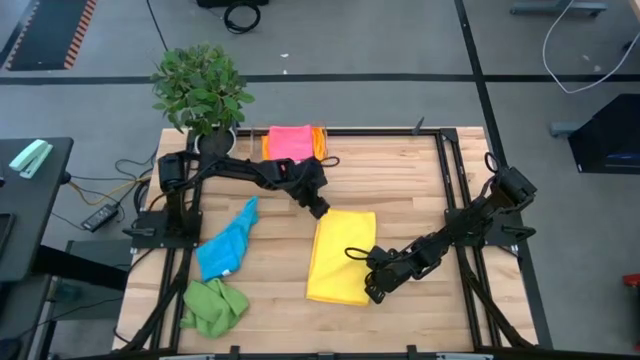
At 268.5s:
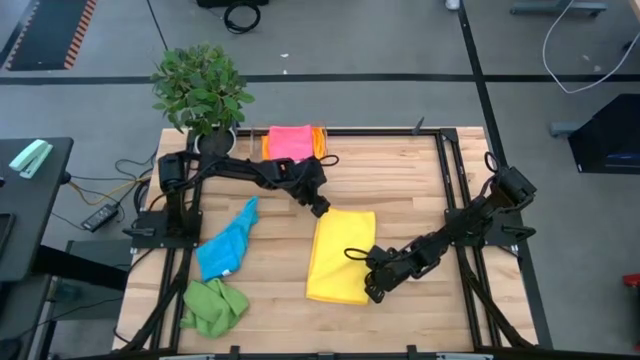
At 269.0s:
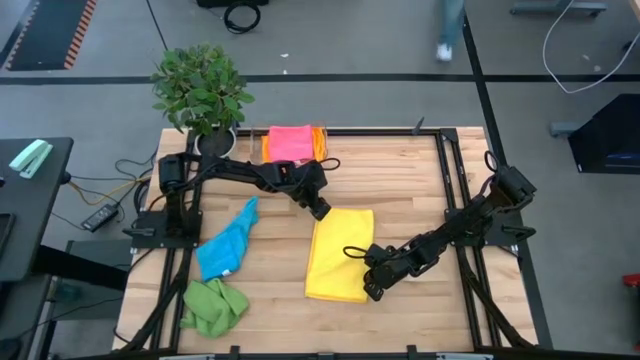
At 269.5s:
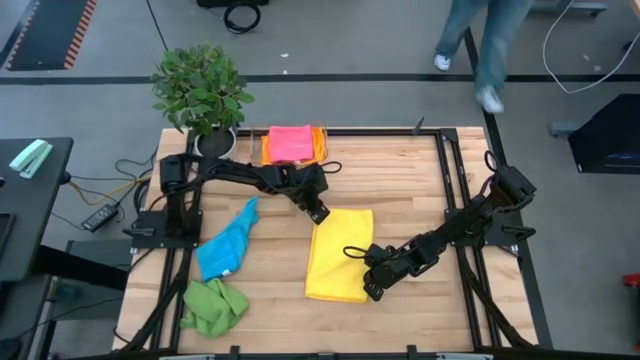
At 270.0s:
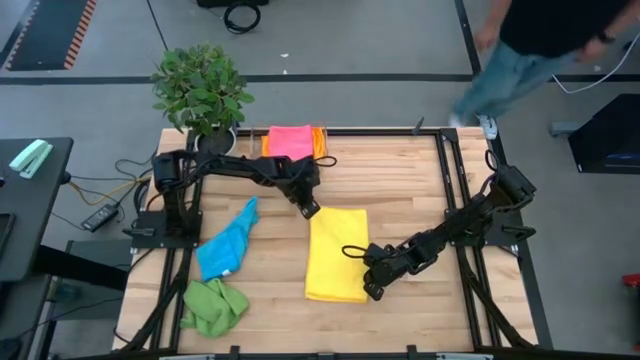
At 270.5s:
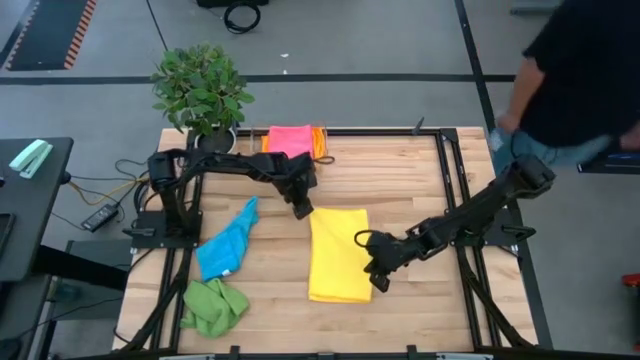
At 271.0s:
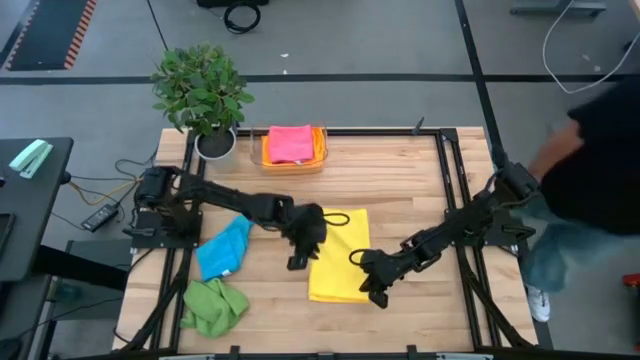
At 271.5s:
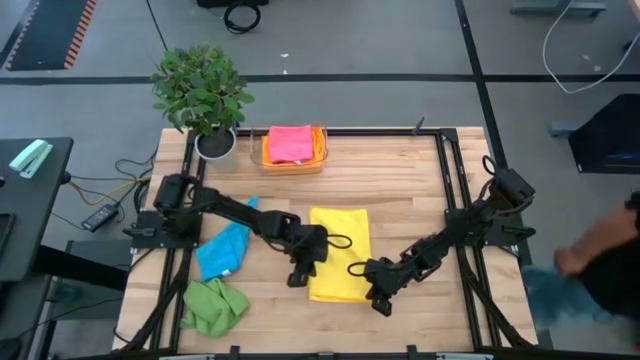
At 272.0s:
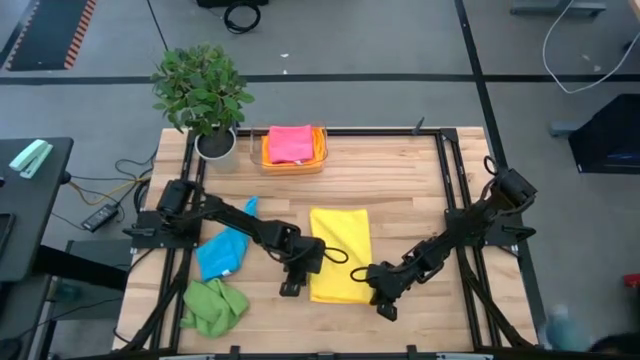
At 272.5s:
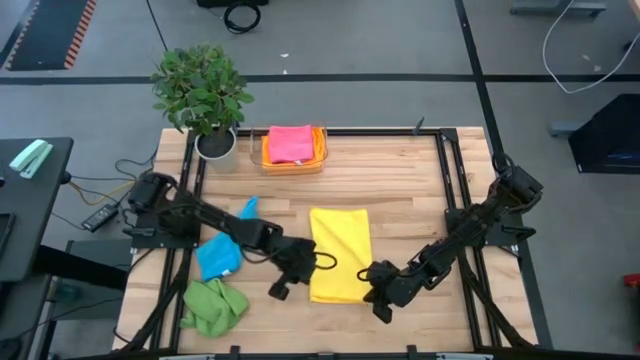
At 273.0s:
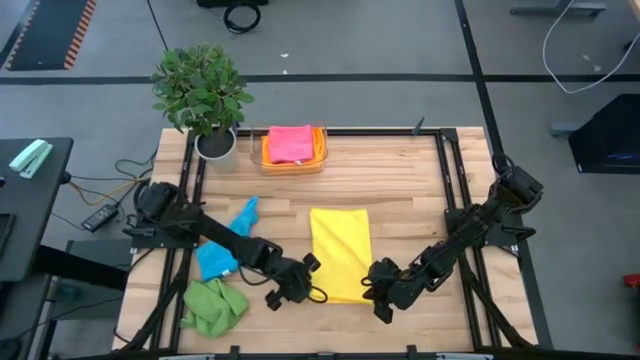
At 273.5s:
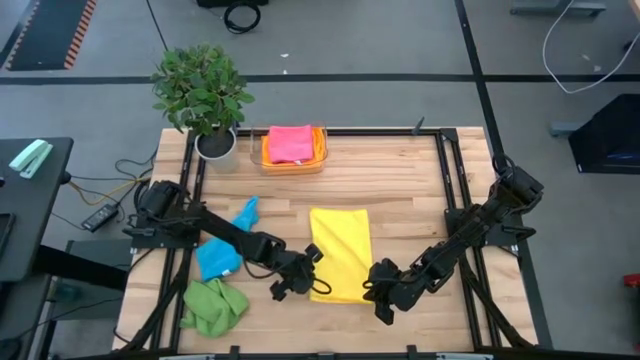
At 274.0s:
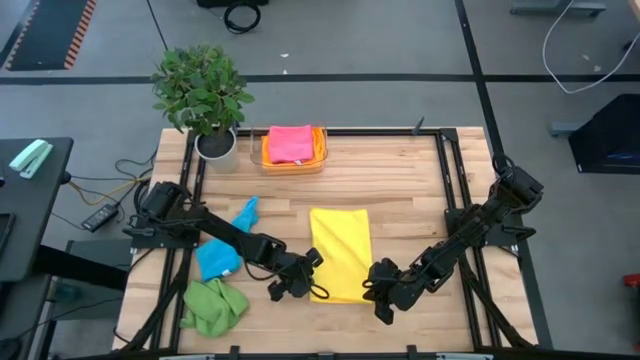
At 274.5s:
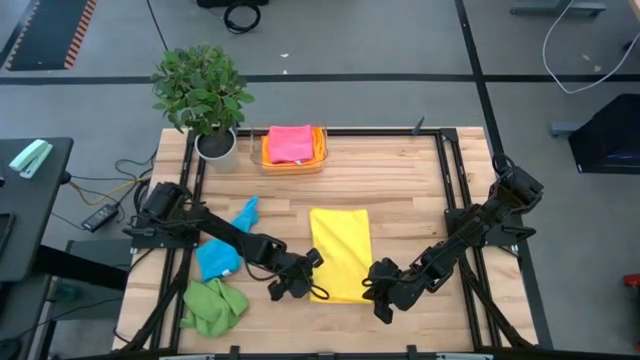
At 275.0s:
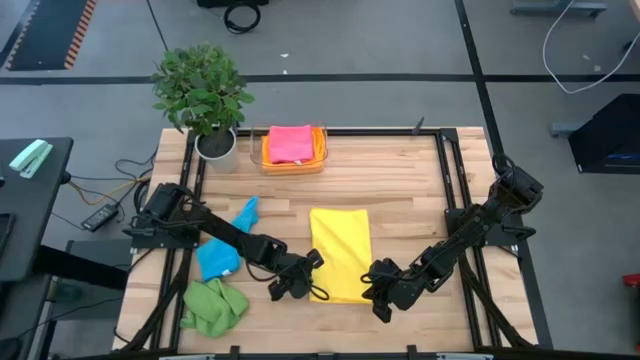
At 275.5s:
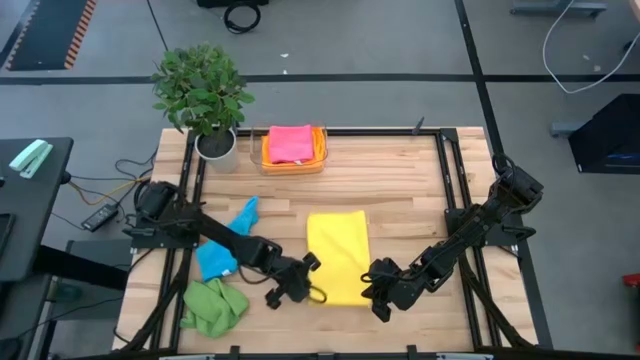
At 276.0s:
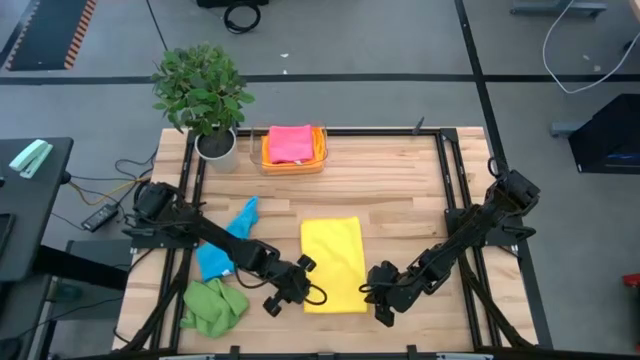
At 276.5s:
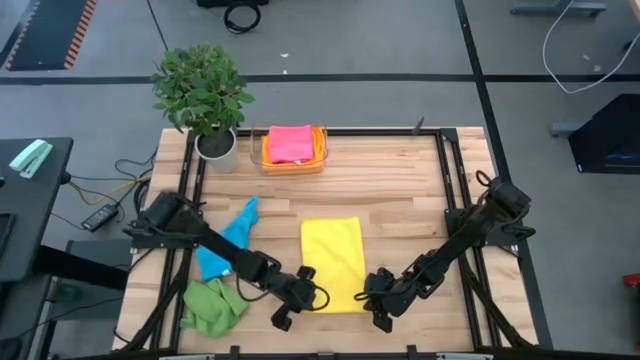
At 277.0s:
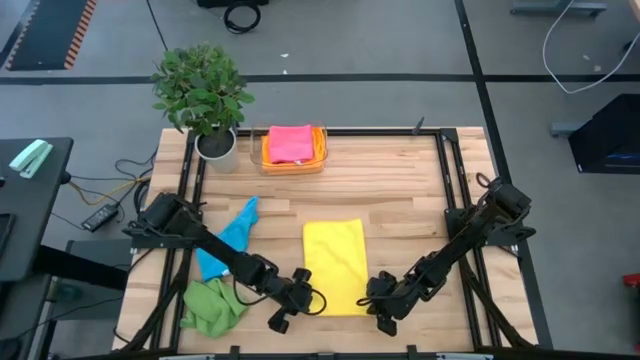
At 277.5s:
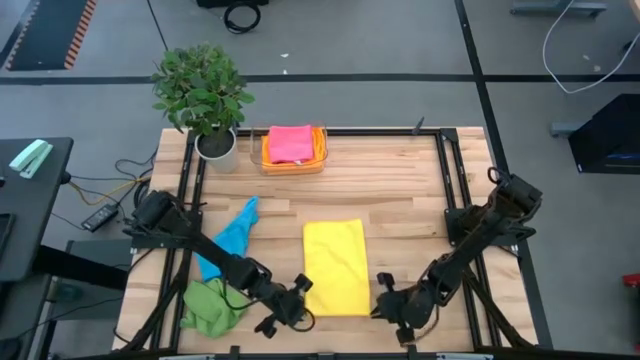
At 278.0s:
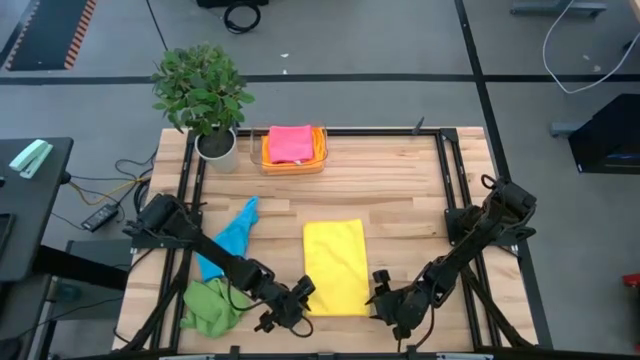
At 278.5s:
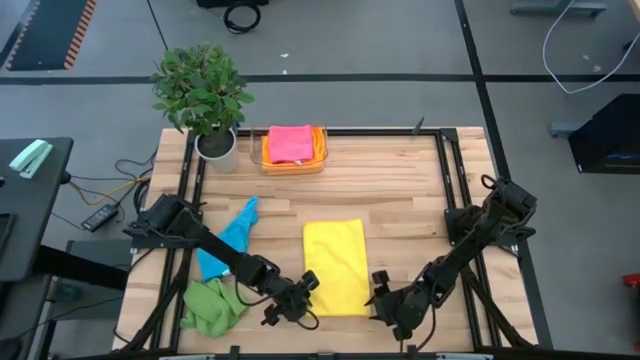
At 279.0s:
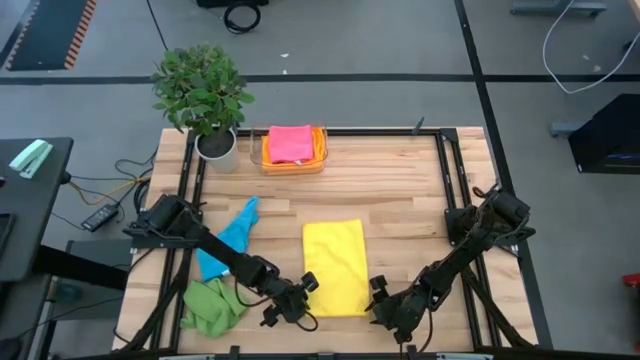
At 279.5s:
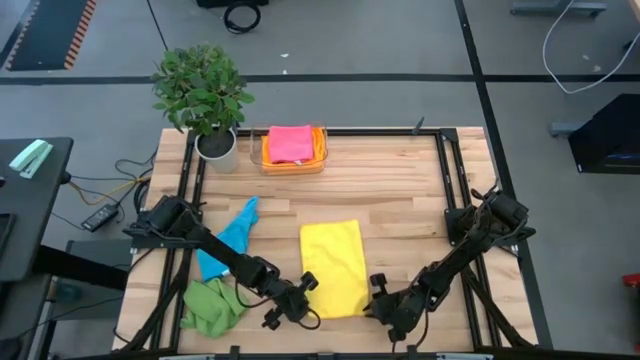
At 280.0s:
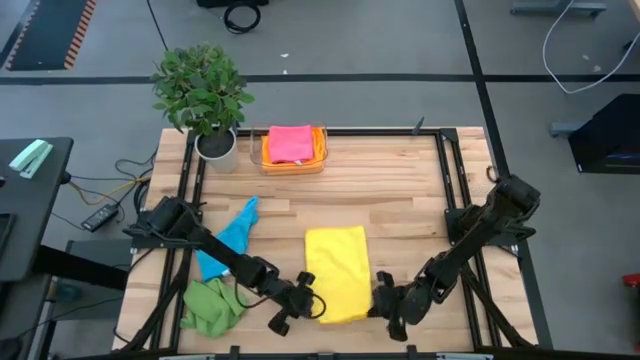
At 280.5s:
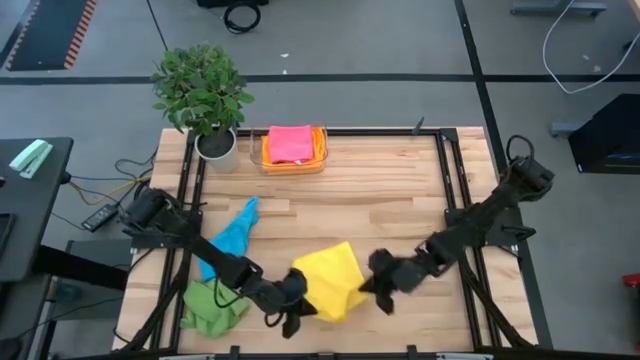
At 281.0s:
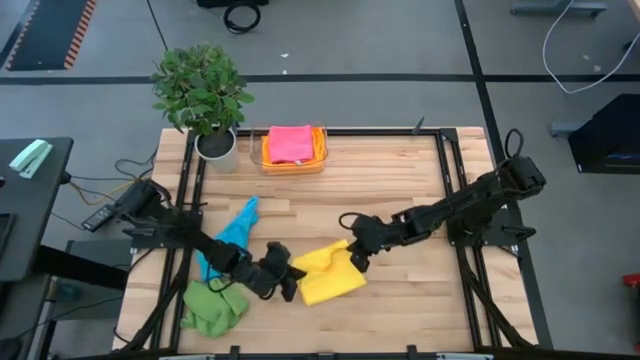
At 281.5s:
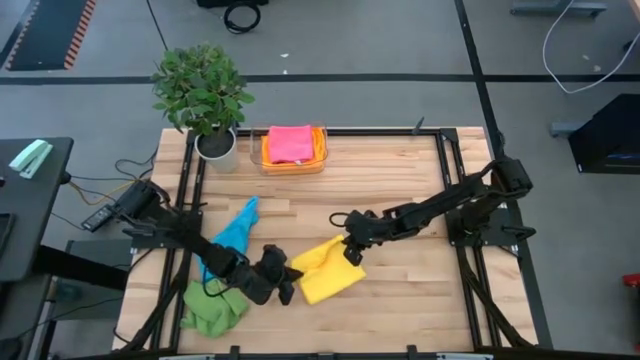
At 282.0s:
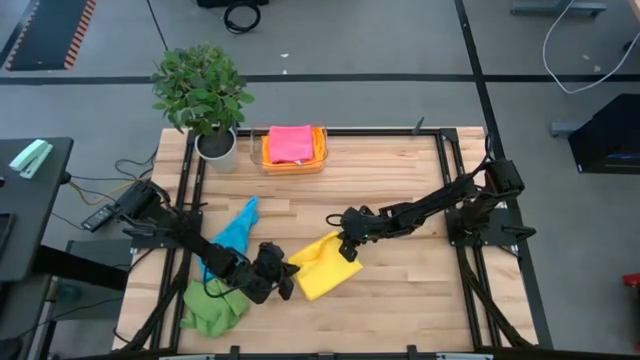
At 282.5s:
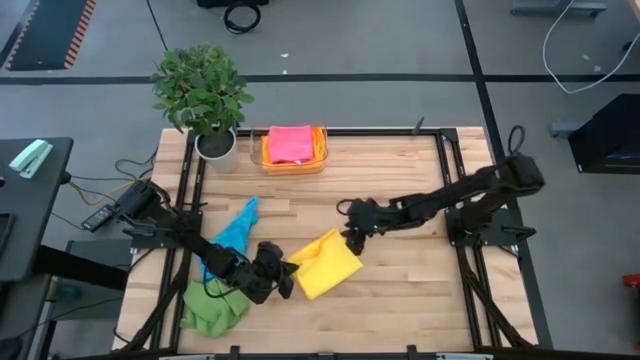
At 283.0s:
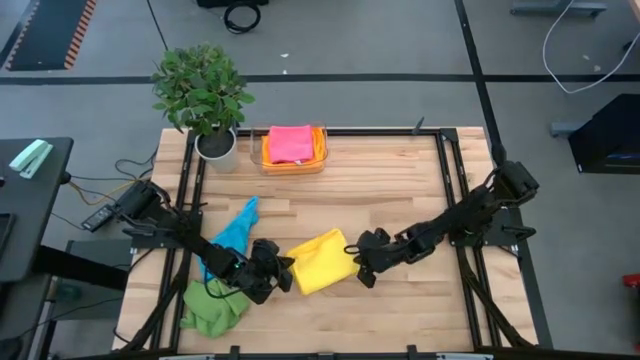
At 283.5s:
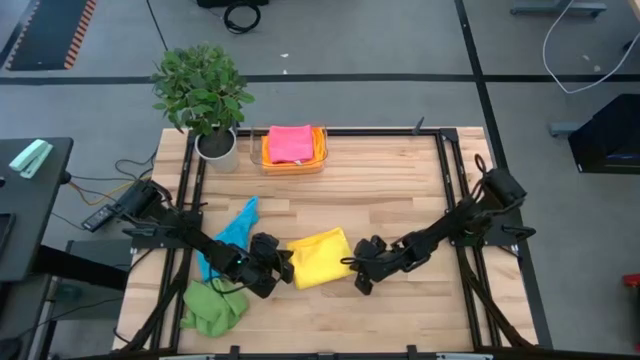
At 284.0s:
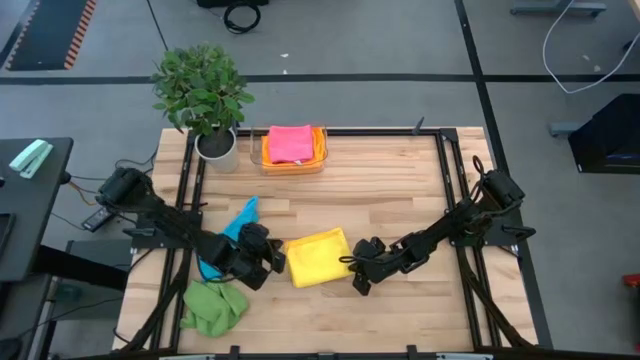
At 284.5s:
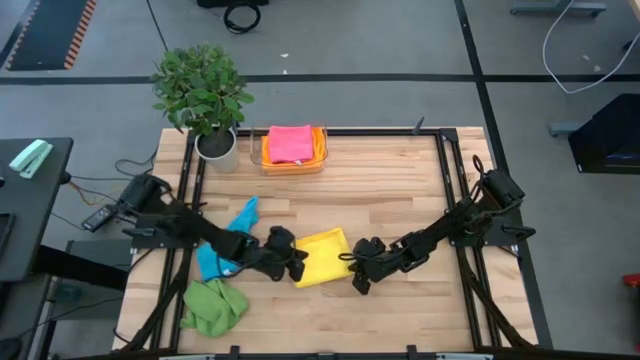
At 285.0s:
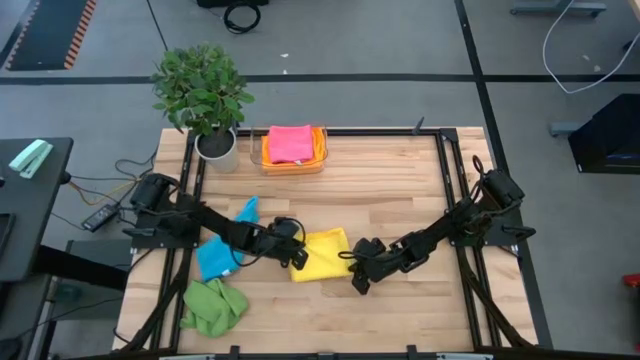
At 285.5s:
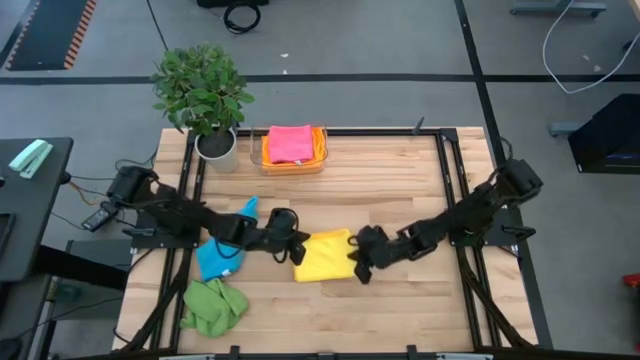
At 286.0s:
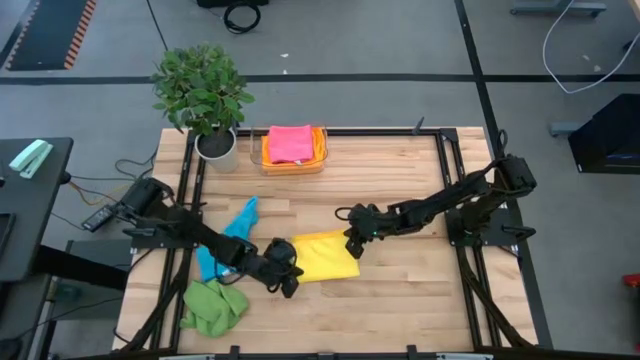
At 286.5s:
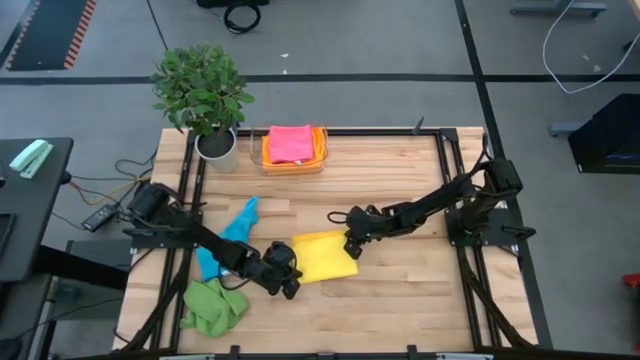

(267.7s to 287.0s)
Task: Fold microfiber towels
Fold the yellow microfiber cloth

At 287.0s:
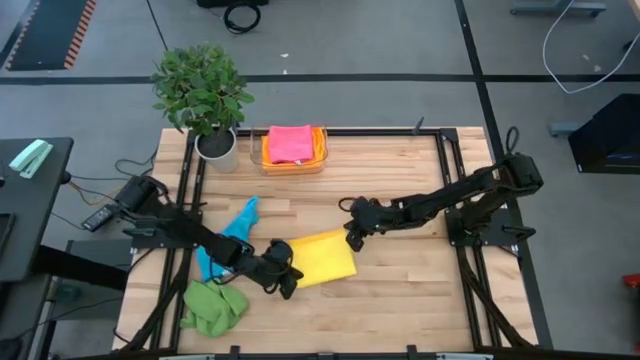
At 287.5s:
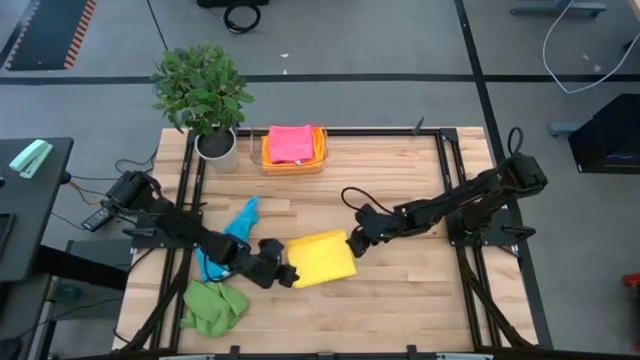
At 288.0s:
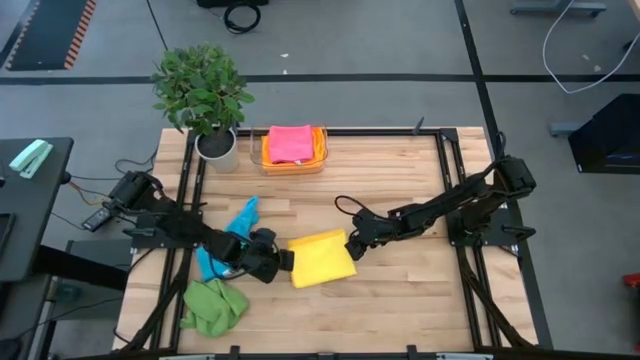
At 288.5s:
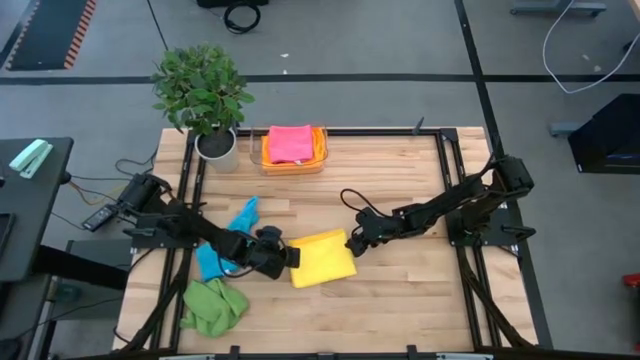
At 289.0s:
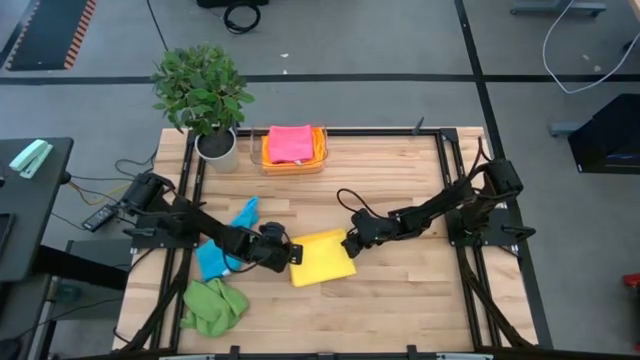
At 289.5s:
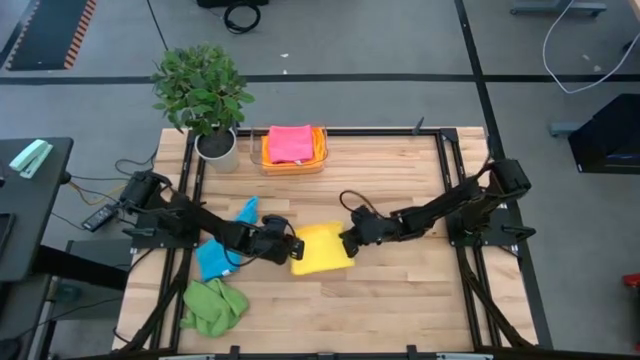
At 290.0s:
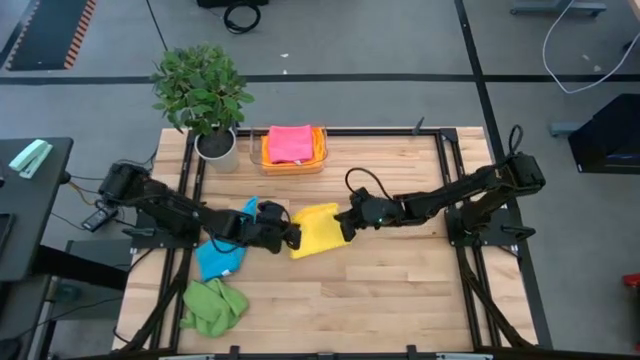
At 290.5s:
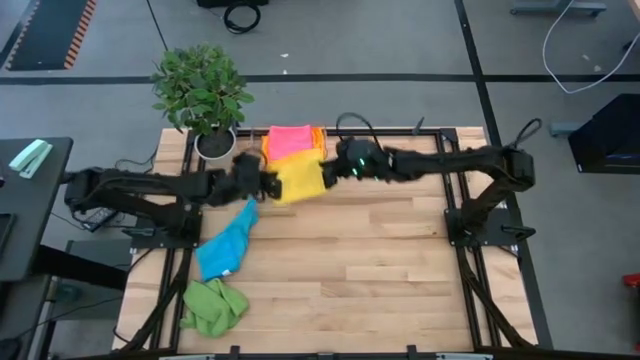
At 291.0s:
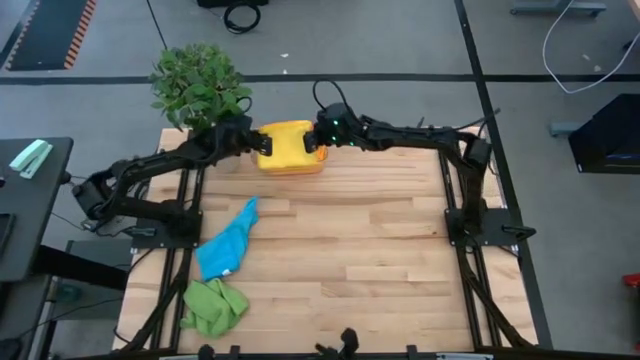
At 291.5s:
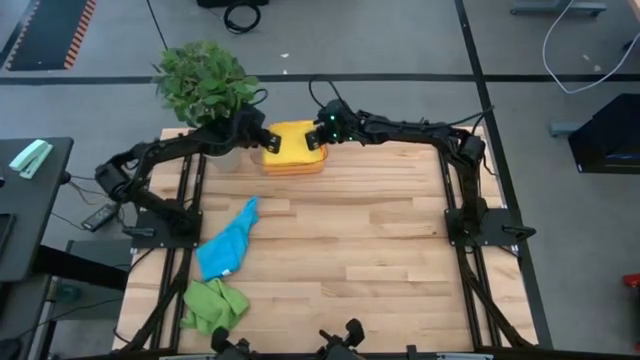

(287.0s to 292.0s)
Stack the folded yellow microfiber cloth on top of the pink microfiber cloths in the transparent bin
